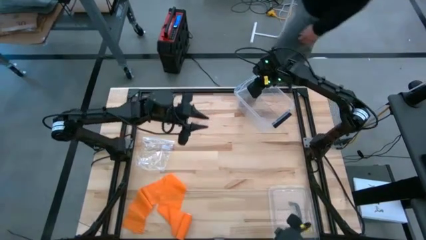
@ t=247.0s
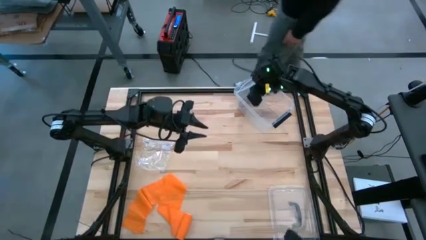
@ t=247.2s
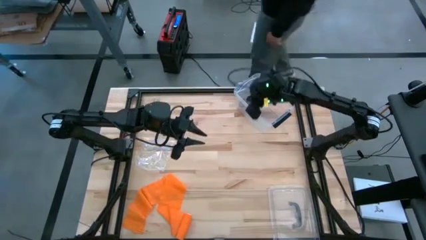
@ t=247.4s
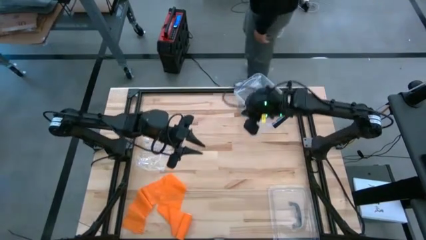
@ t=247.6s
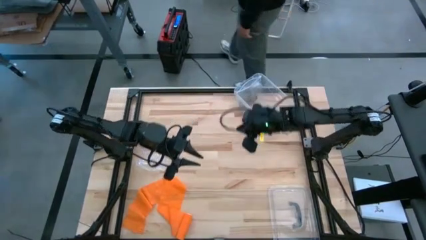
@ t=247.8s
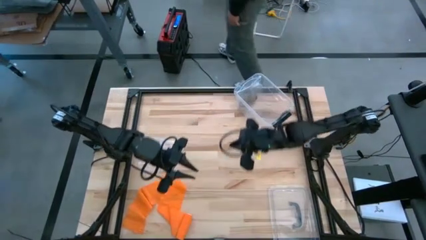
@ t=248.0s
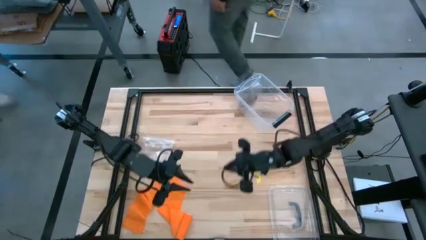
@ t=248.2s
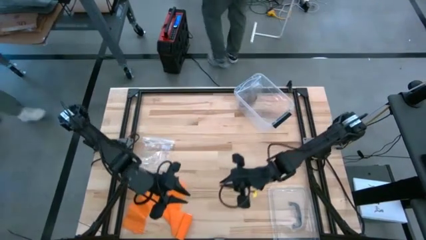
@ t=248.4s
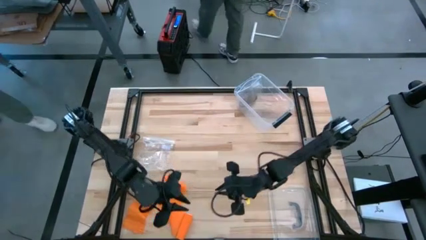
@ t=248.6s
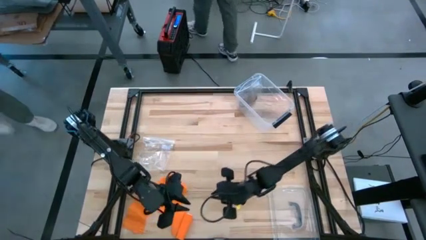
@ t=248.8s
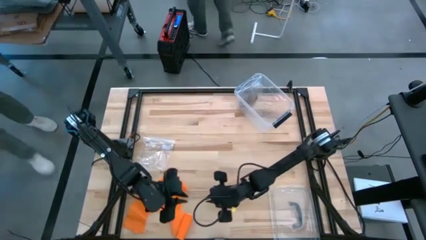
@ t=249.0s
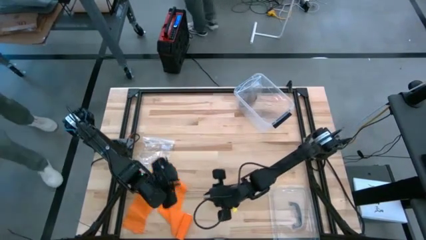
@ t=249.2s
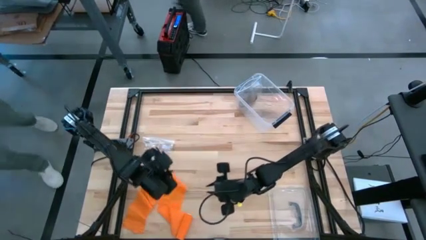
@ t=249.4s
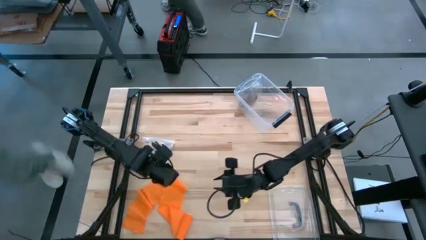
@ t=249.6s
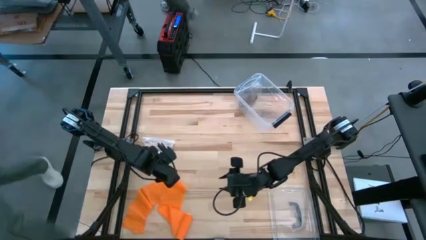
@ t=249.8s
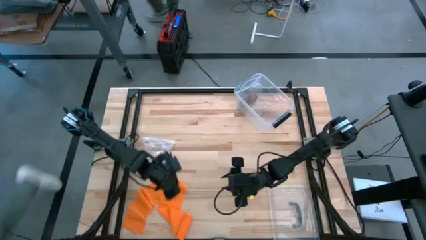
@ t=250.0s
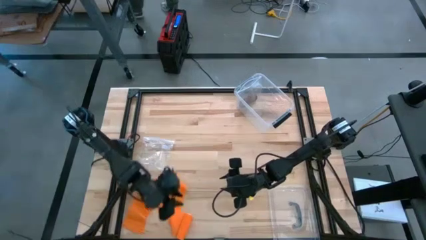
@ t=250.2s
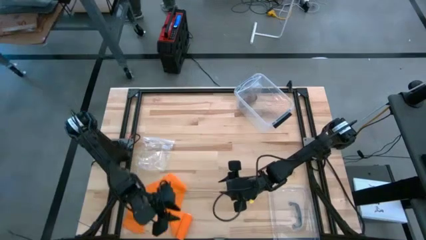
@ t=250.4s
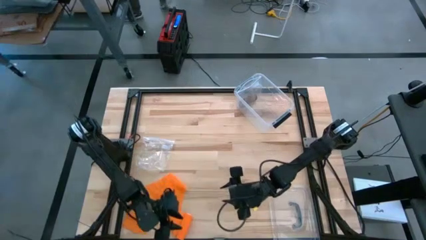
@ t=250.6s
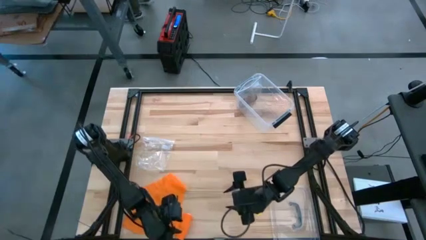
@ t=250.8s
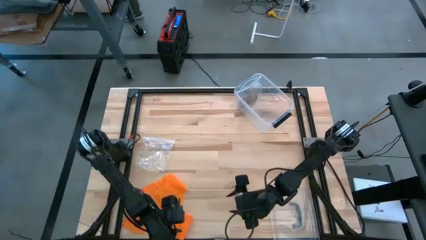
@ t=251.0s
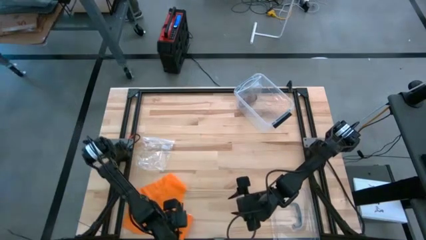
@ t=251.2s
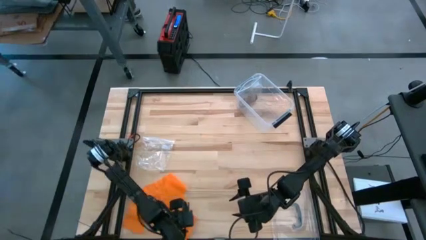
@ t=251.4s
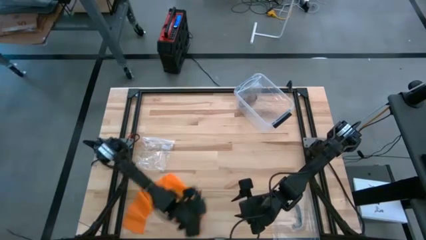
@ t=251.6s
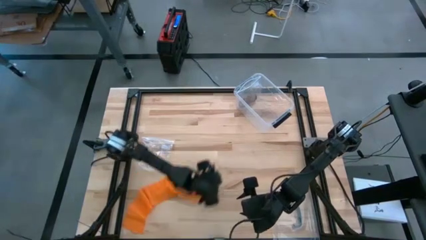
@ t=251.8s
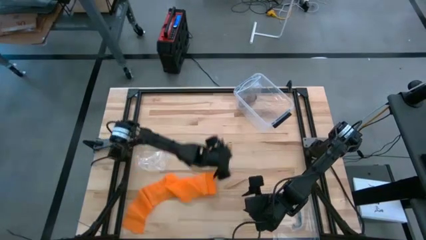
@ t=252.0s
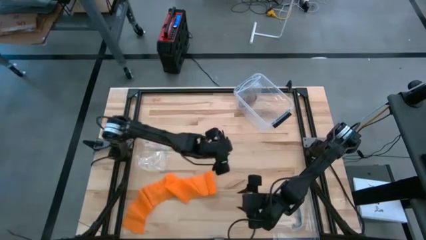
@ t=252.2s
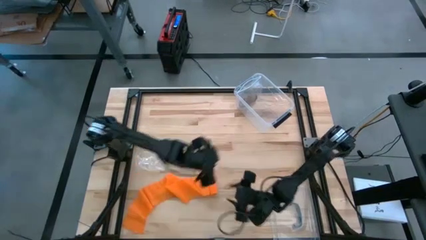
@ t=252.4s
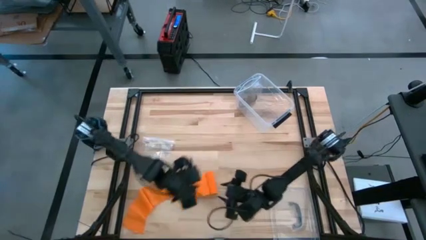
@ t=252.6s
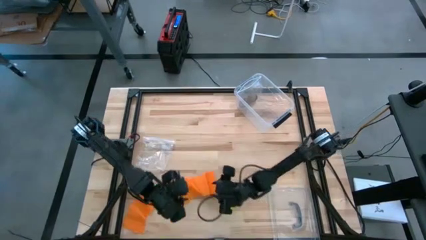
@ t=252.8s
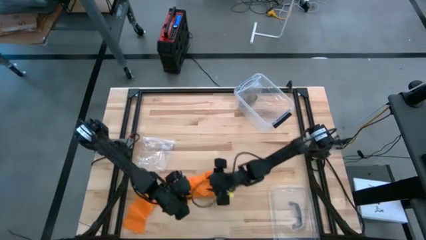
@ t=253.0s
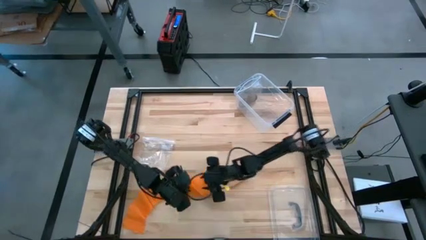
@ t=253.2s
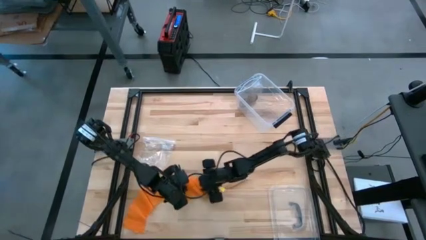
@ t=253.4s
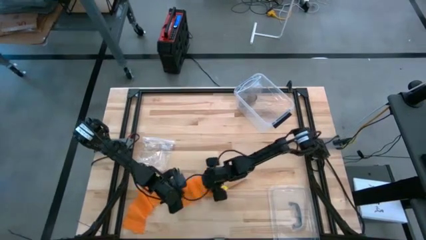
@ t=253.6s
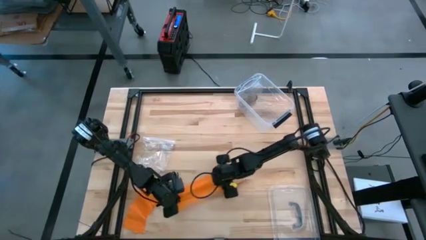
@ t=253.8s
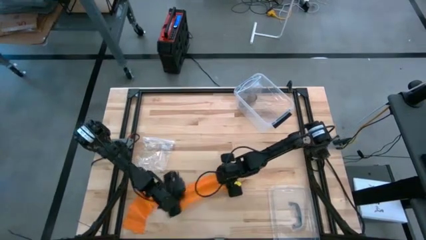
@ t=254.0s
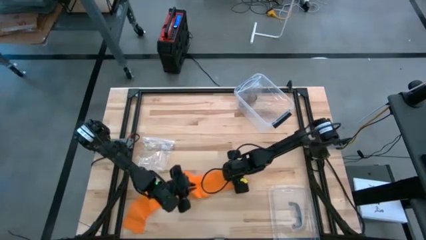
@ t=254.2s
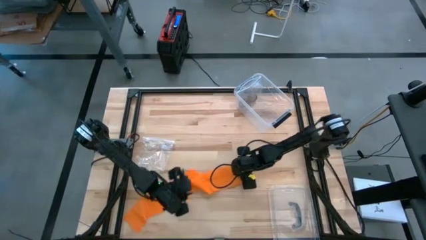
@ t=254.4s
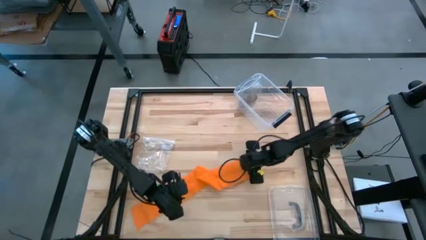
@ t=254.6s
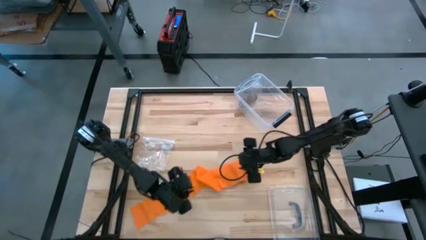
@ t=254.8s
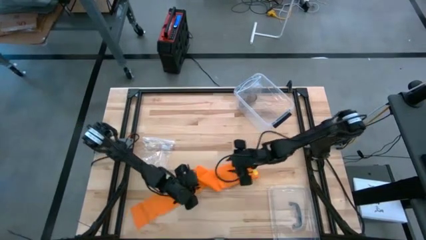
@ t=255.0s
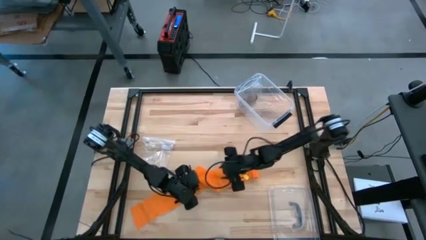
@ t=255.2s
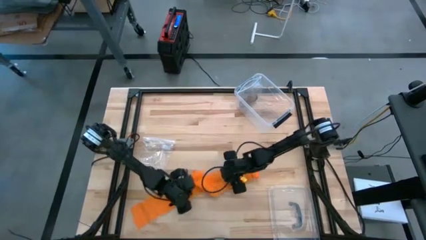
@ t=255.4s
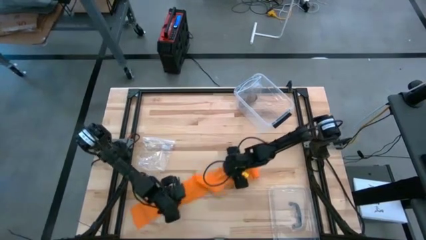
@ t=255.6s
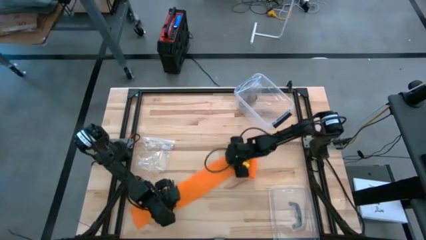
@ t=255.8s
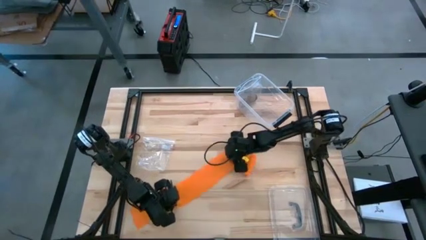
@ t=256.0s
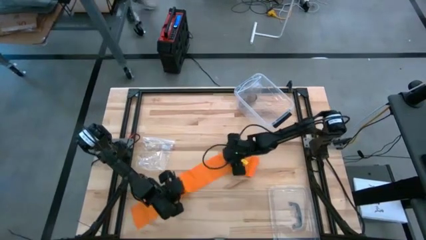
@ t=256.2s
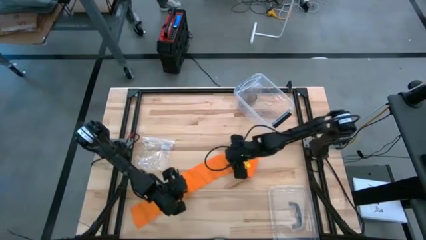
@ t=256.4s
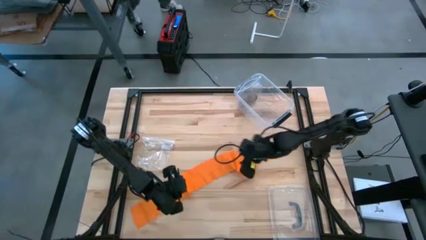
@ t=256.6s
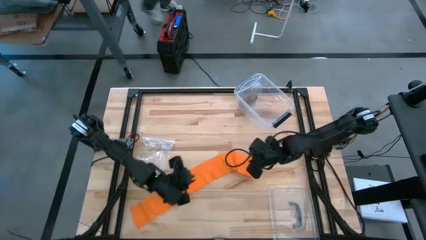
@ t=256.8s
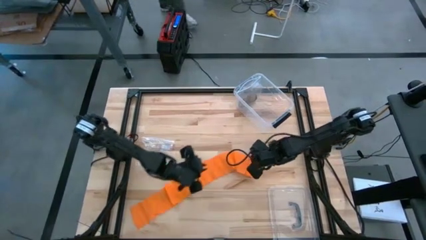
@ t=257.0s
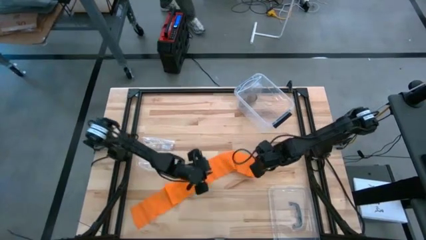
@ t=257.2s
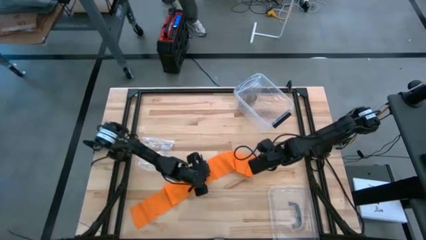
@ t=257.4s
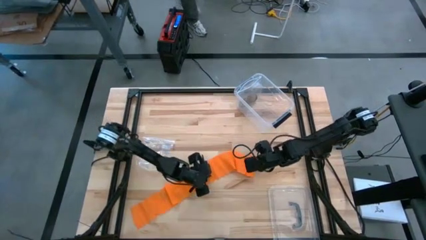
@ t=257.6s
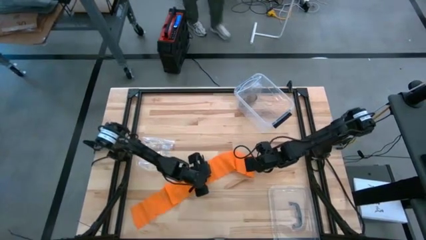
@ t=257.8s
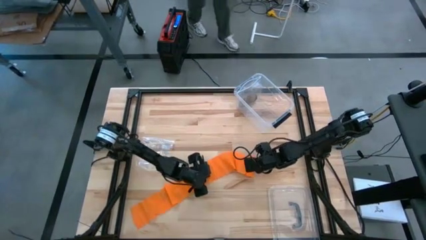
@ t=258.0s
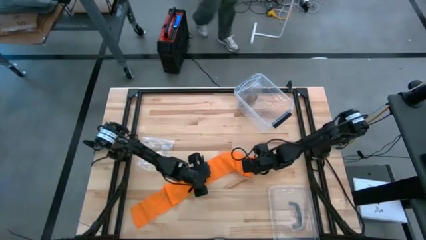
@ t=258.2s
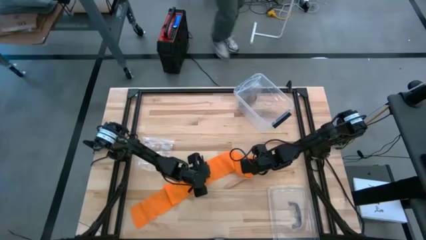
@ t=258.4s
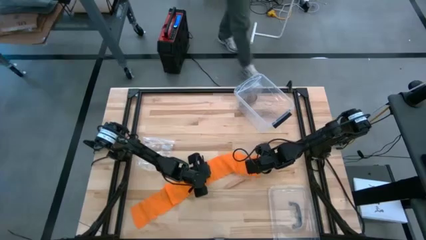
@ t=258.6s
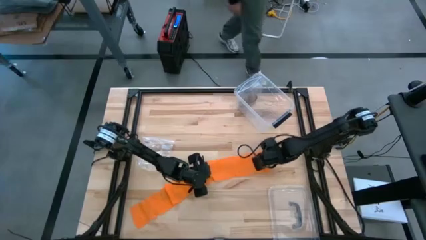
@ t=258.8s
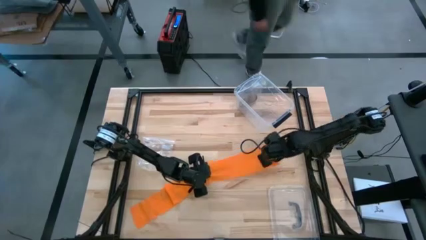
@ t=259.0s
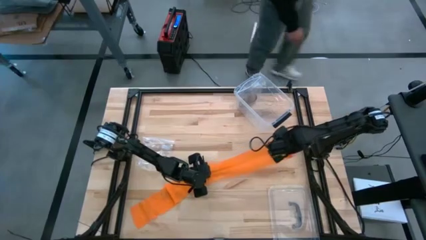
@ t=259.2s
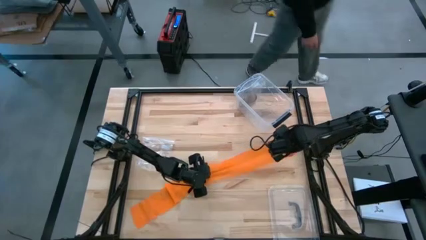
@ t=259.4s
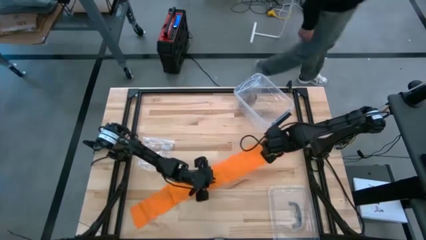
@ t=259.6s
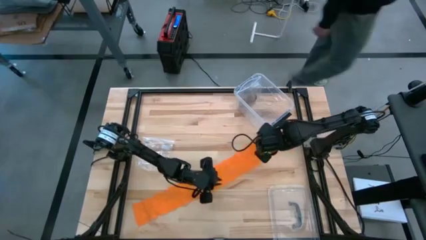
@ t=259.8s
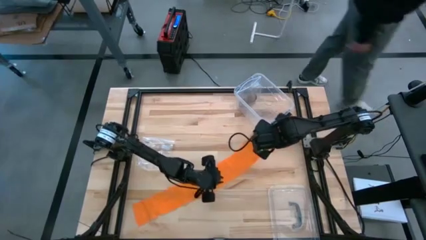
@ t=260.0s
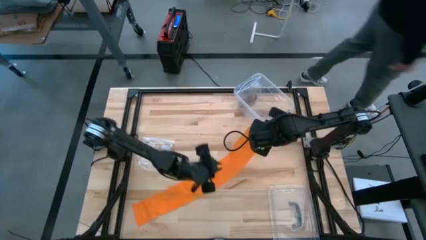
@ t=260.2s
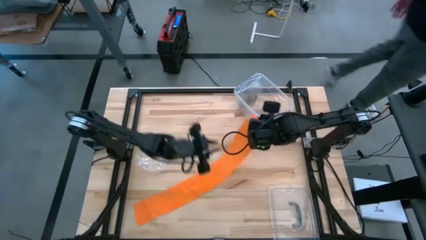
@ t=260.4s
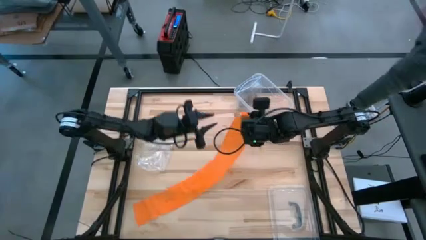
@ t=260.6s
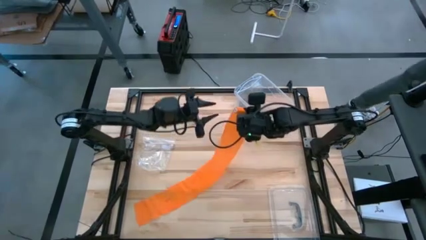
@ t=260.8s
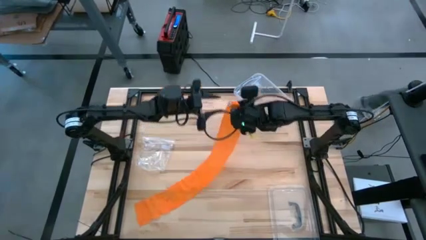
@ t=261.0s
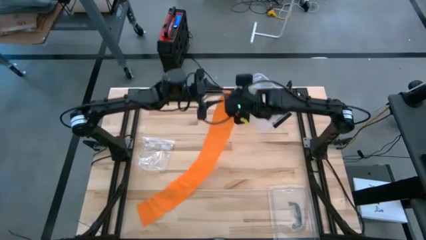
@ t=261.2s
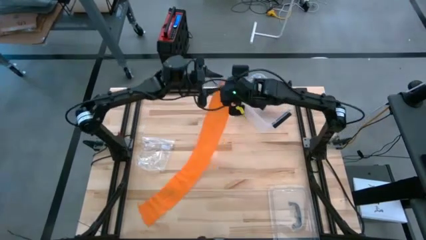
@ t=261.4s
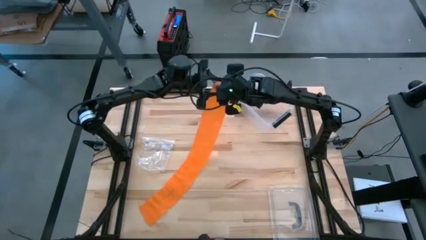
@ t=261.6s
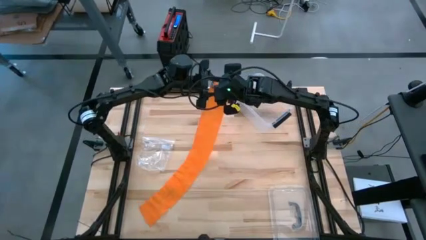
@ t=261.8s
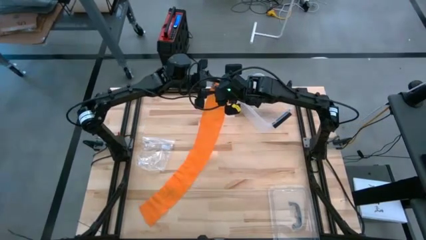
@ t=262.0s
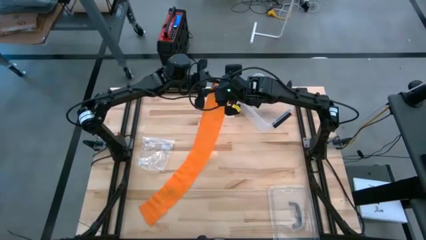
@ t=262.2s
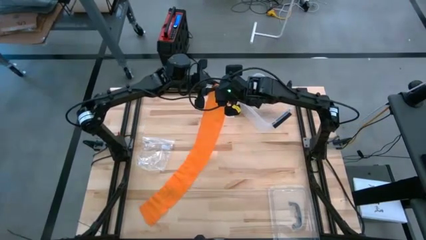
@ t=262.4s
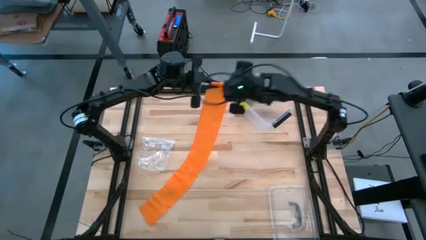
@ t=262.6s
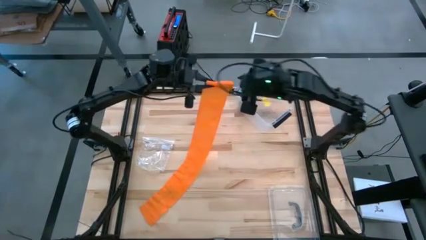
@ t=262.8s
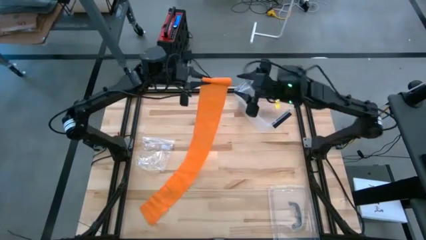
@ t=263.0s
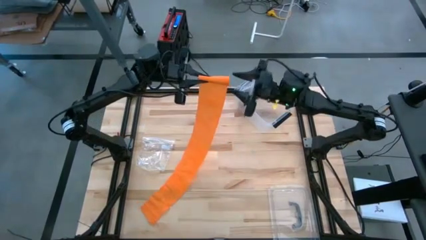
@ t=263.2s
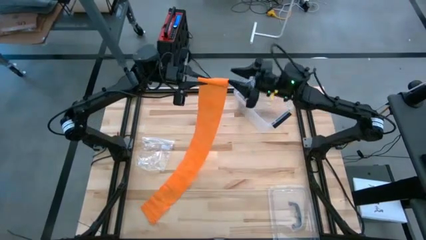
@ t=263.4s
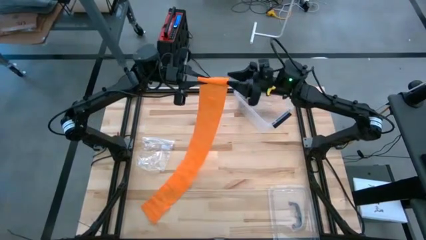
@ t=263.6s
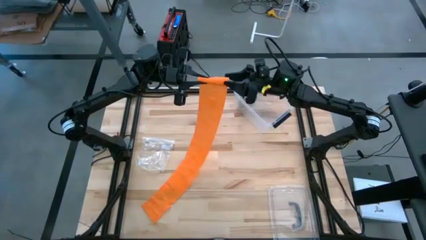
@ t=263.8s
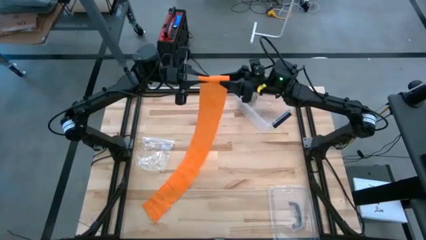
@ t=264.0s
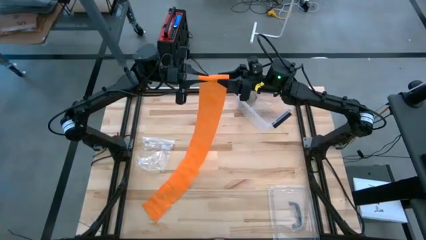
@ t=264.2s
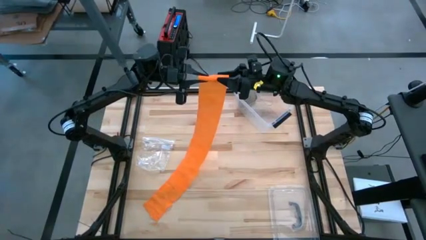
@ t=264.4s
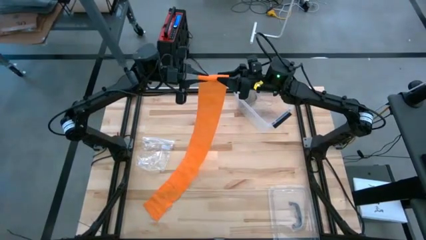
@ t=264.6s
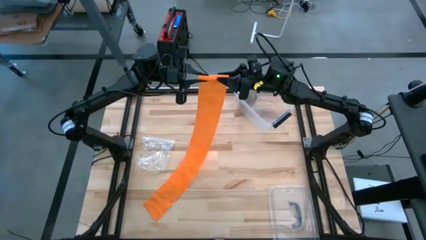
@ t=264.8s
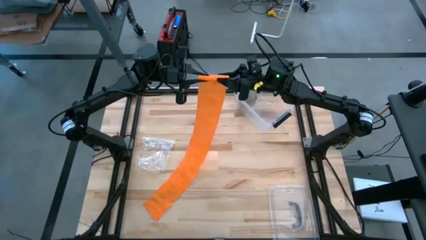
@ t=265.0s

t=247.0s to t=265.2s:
Task: Roll bandage
Roll the orange bandage on the table
